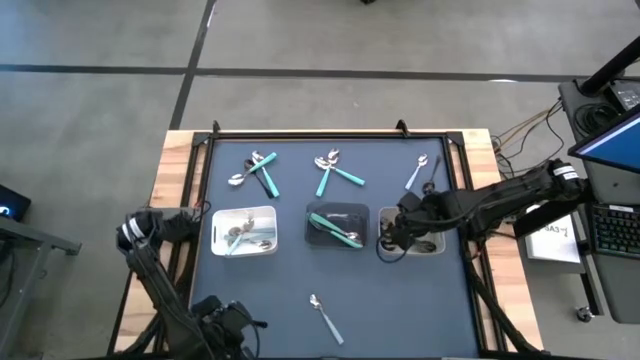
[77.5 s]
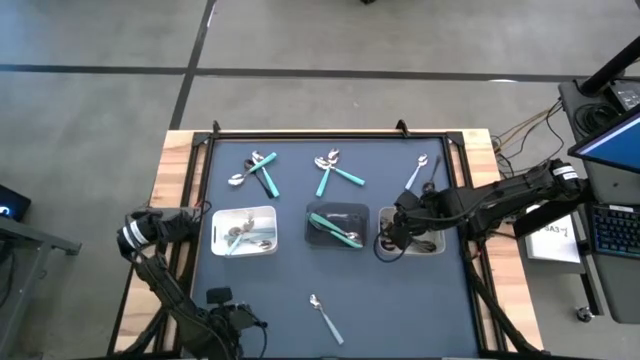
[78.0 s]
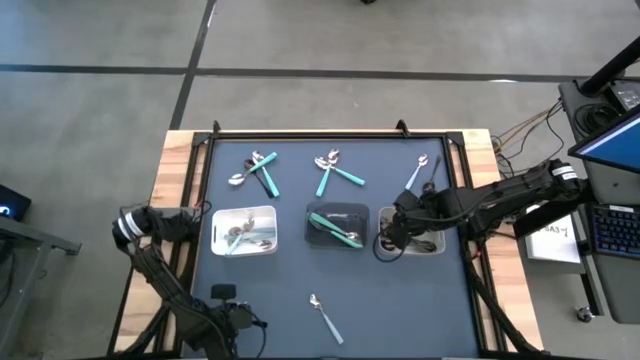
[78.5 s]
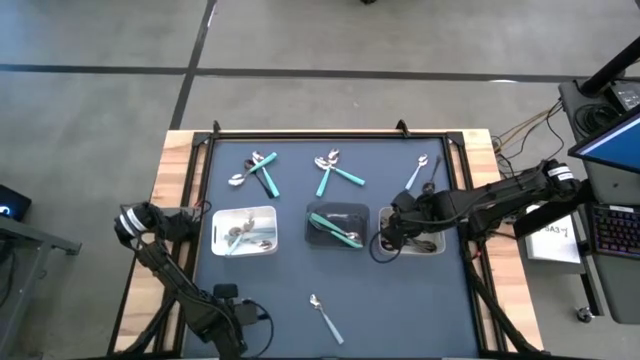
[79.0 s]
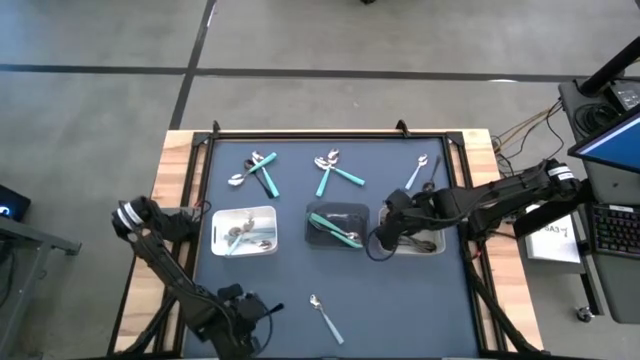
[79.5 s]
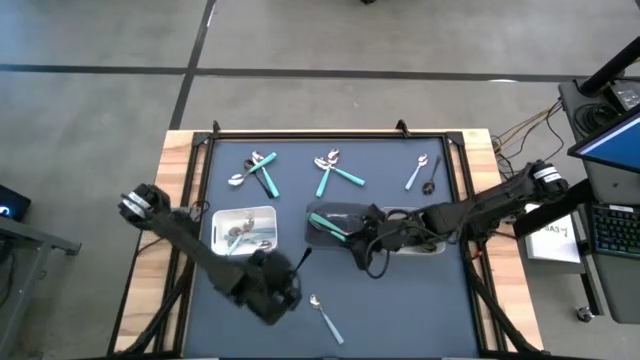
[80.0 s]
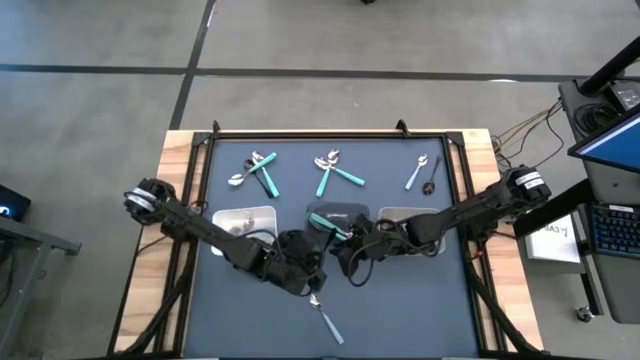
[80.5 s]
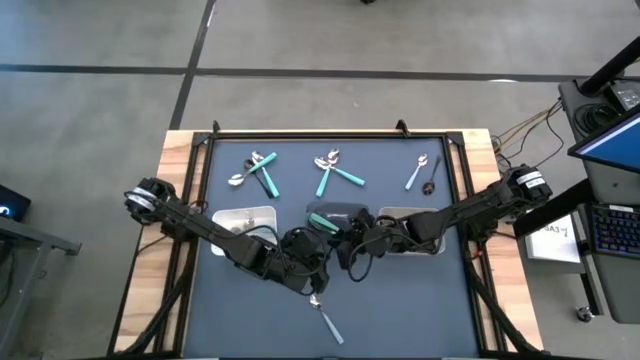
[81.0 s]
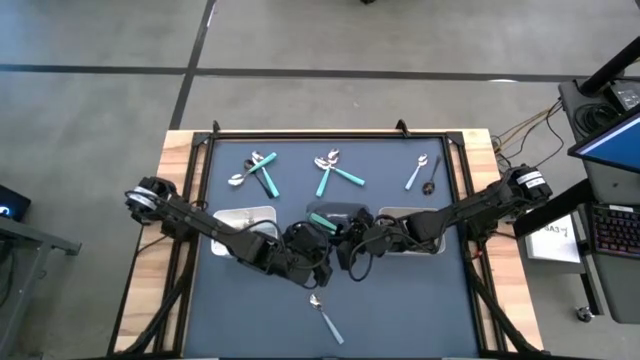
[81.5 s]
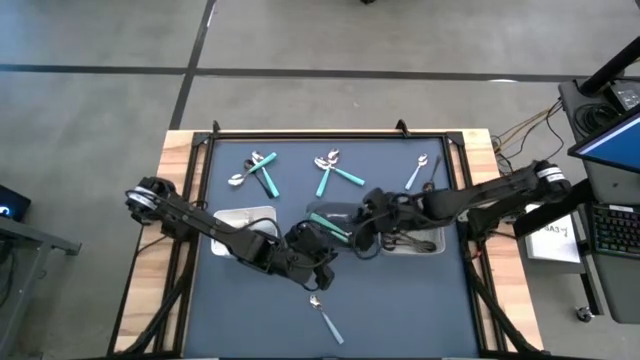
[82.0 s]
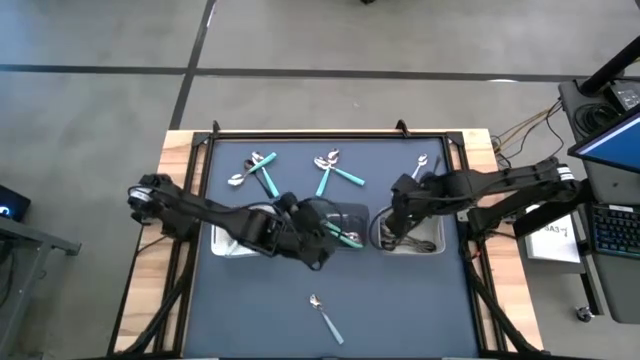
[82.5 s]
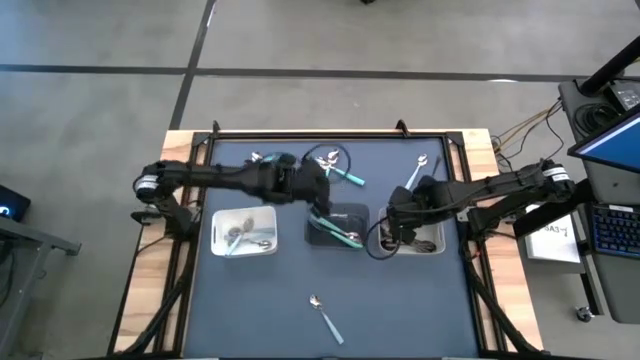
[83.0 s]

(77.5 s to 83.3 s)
Task: Sort silverware by color (type)
Put the black spoon into the gray bin

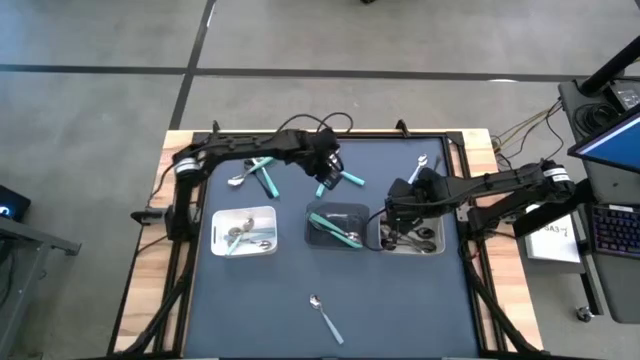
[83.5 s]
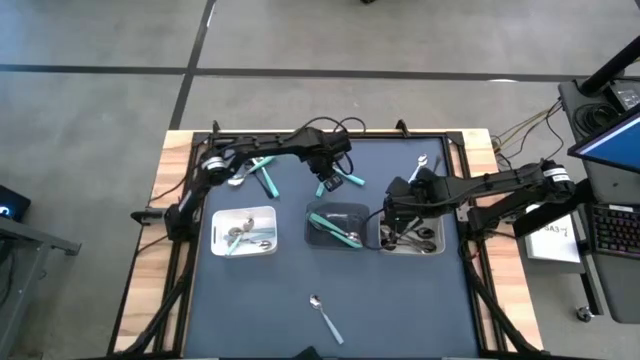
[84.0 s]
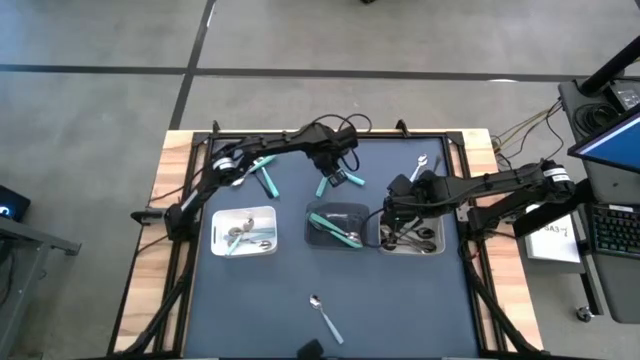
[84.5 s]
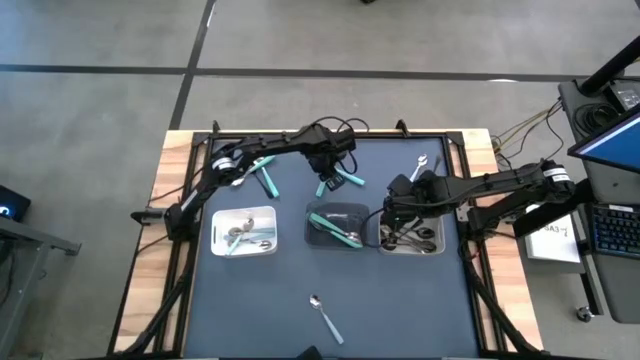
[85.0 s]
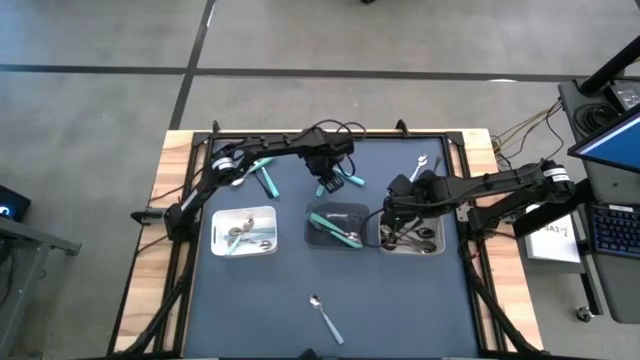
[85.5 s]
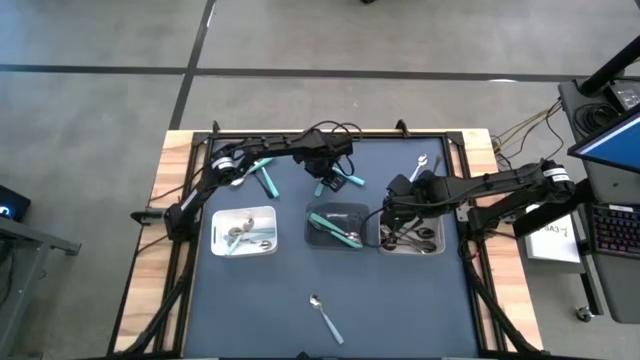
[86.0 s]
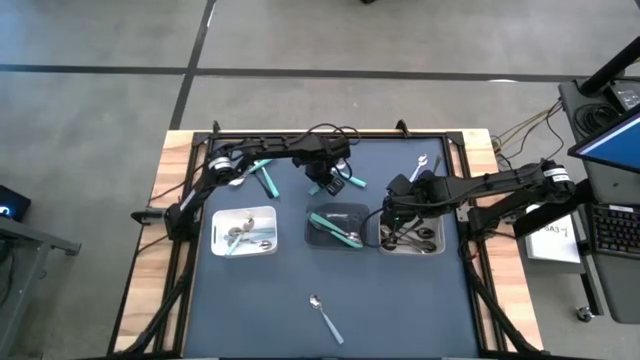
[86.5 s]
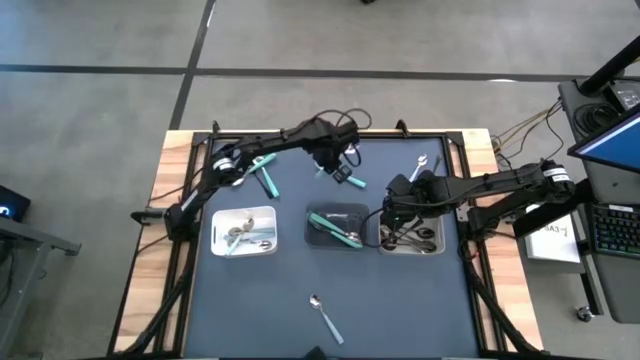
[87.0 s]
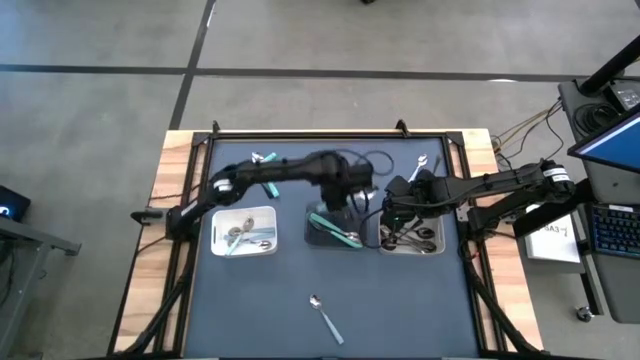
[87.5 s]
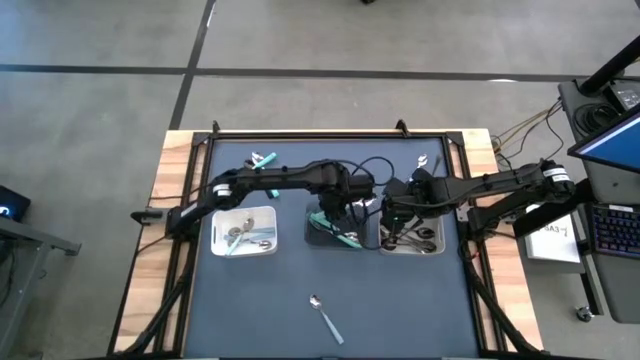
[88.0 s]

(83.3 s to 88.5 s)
Put the green spoon into the black transparent bin

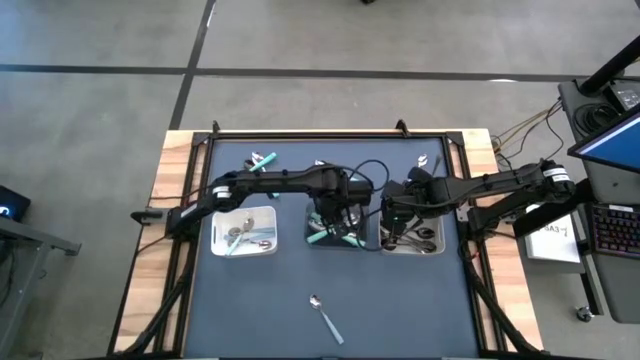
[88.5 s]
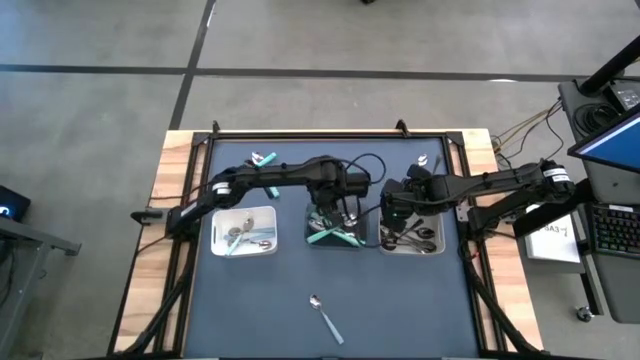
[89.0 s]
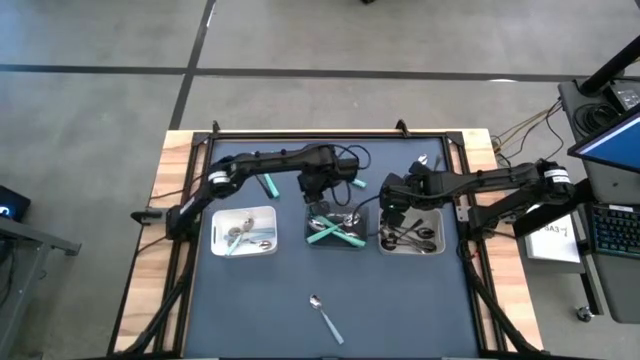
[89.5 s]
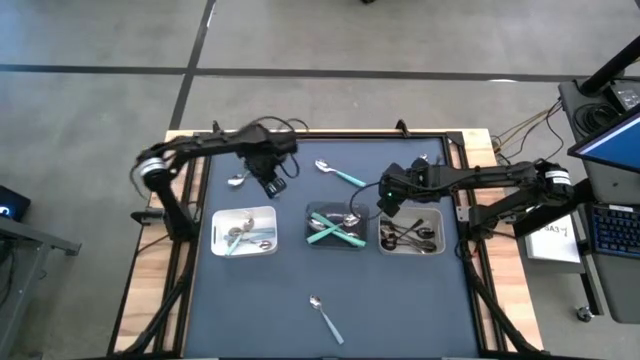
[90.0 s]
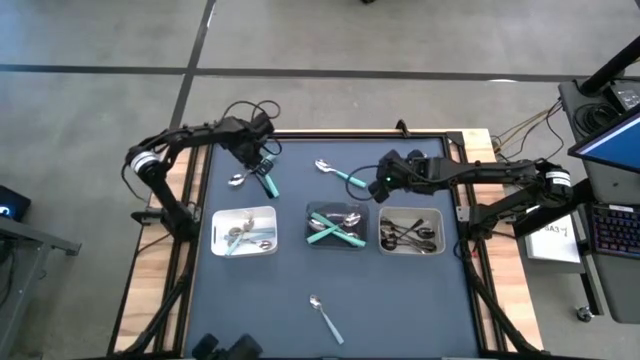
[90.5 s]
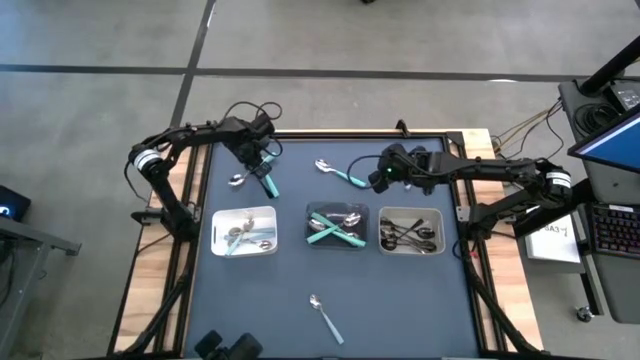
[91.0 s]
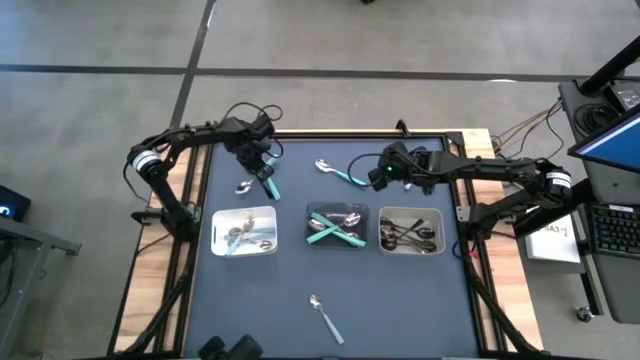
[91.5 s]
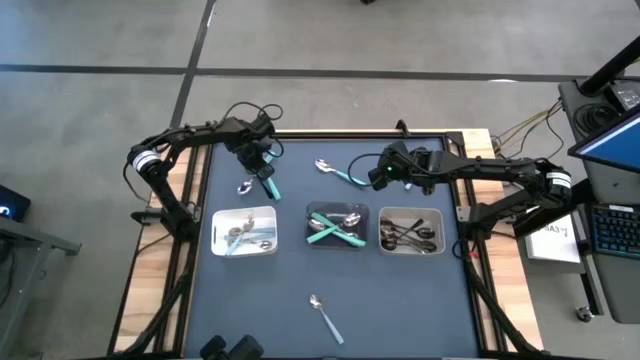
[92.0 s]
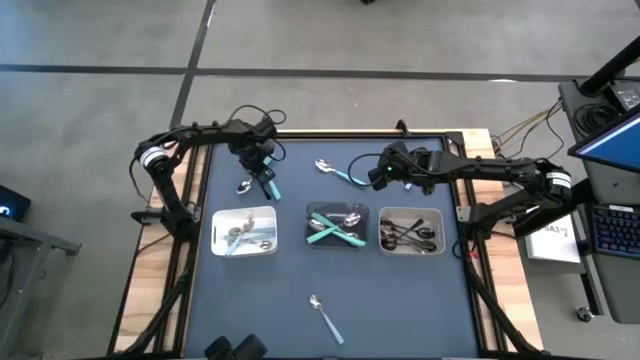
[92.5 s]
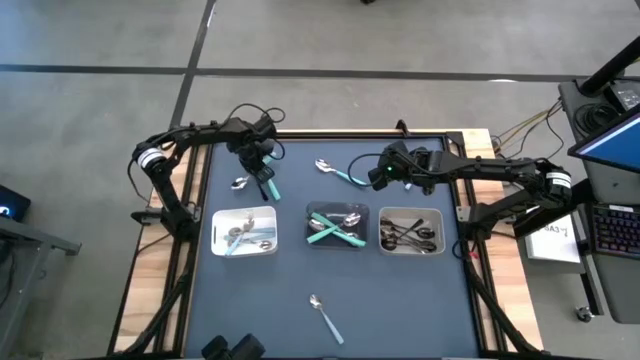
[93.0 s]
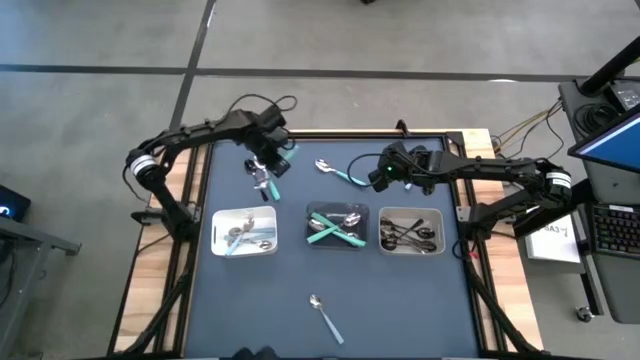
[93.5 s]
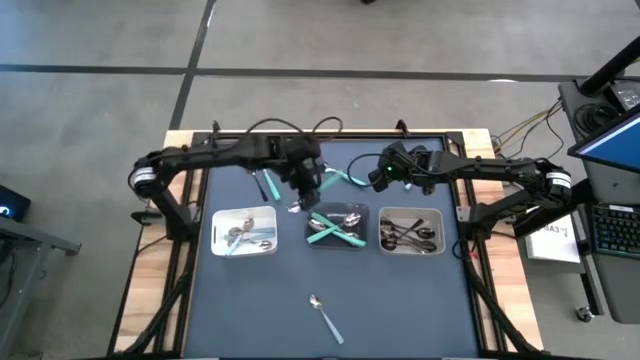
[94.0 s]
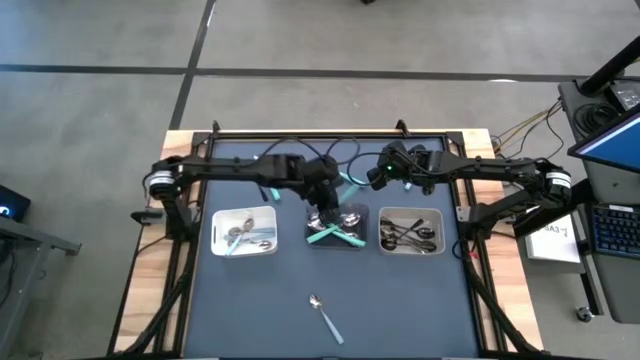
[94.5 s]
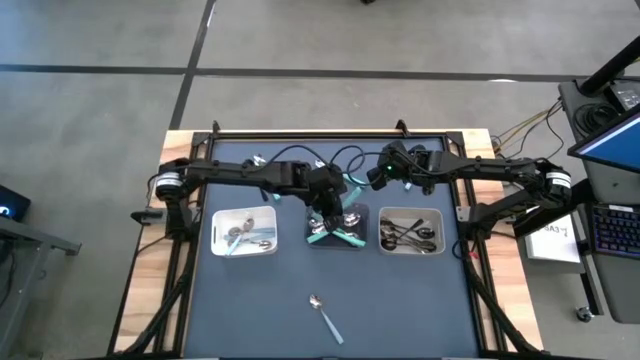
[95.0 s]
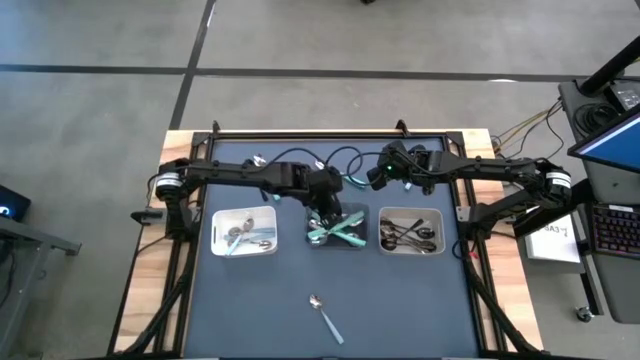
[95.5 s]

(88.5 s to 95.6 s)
Put the green spoon into the black transparent bin

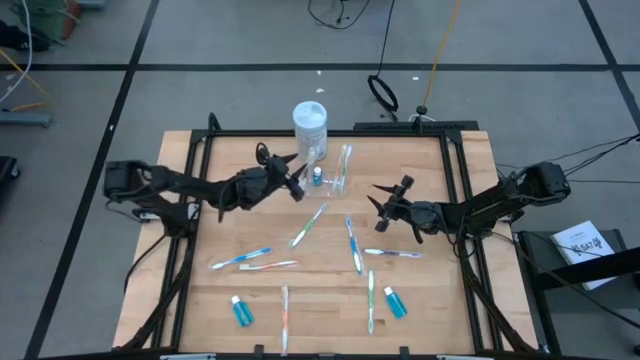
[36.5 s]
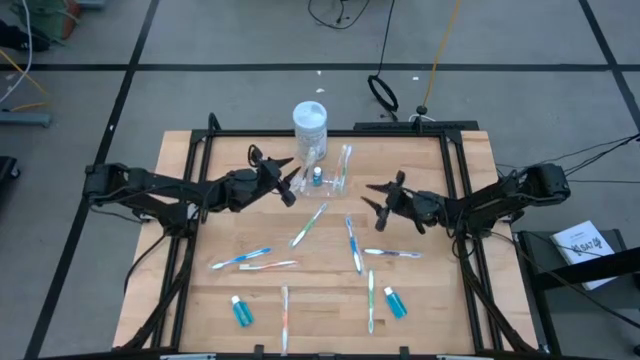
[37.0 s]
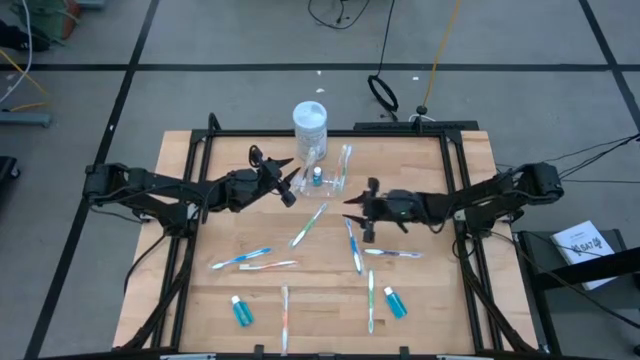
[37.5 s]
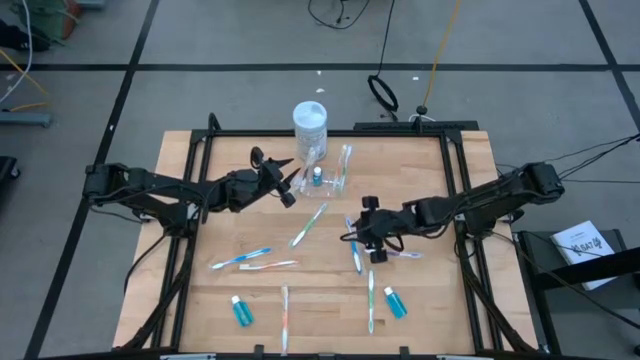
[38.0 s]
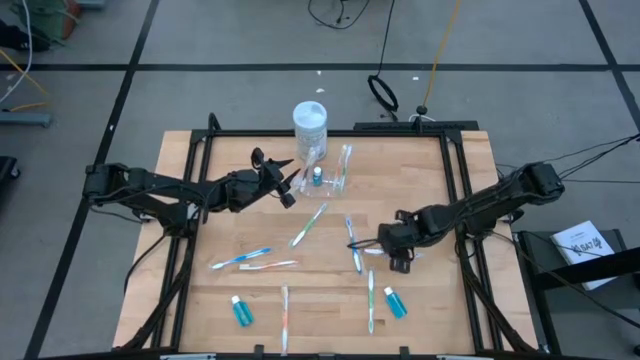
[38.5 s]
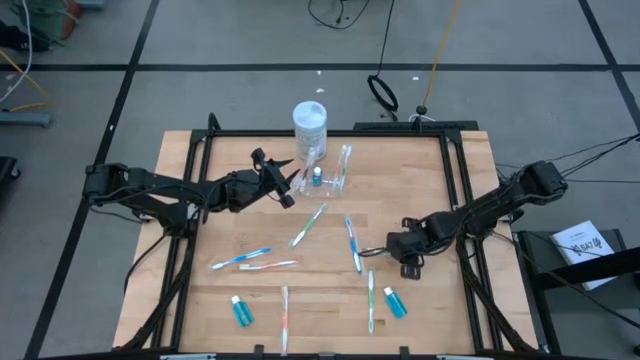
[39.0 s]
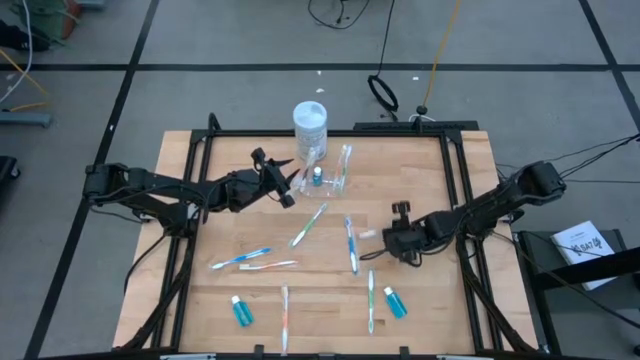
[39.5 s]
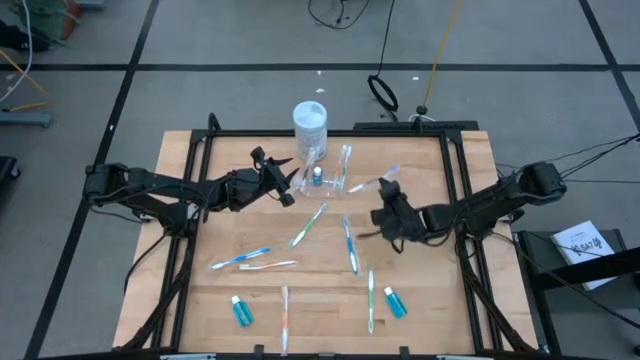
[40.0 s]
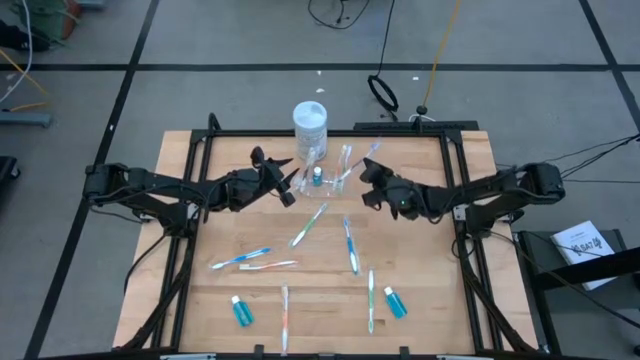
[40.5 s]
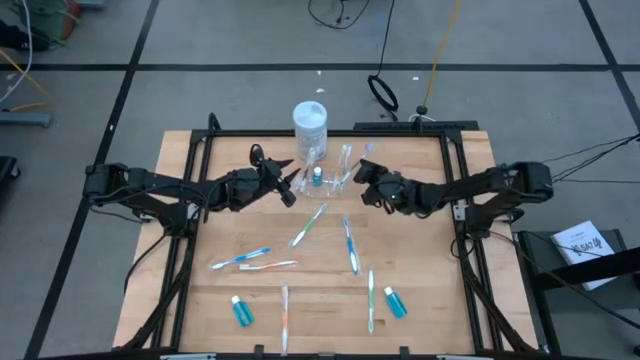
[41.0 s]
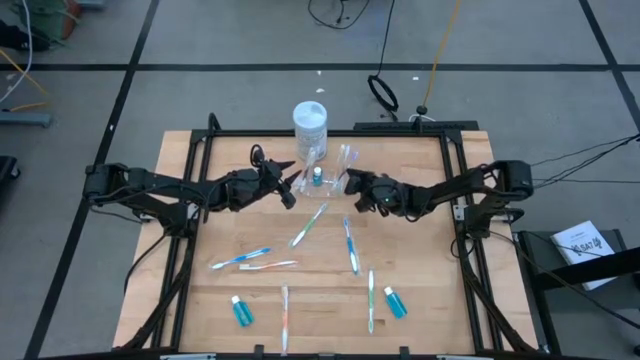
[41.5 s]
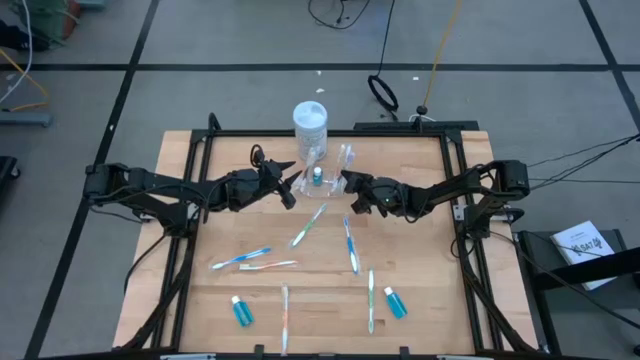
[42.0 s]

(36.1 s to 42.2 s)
Task: Pick & Place toothbrushing station
Put the purple toothbrush into the transparent organizer
